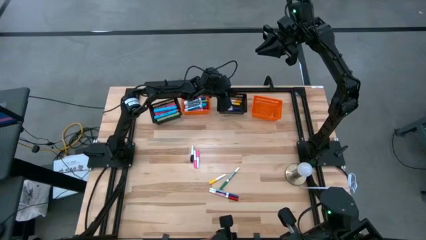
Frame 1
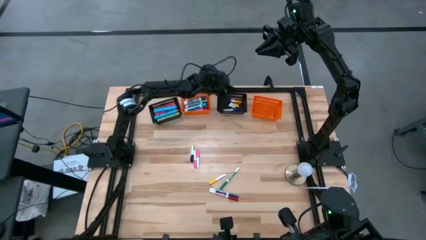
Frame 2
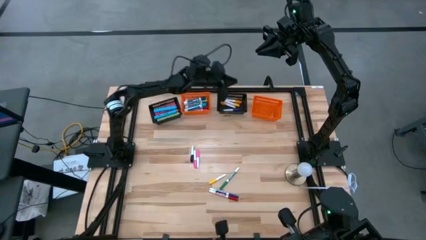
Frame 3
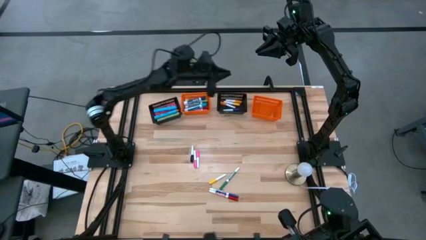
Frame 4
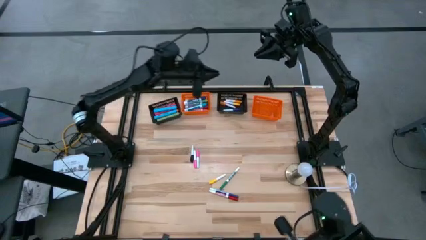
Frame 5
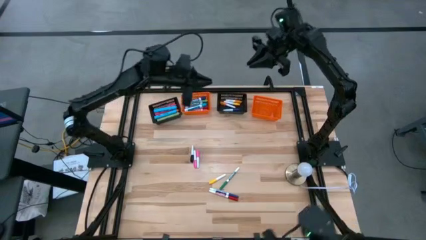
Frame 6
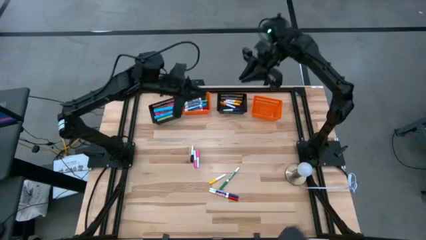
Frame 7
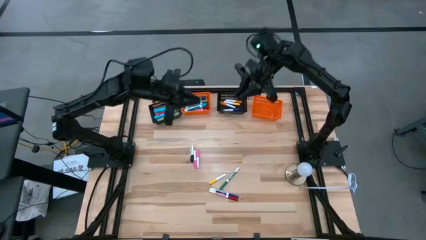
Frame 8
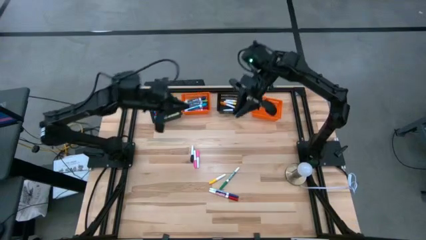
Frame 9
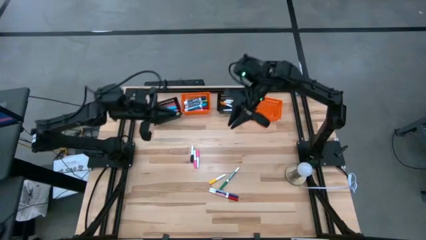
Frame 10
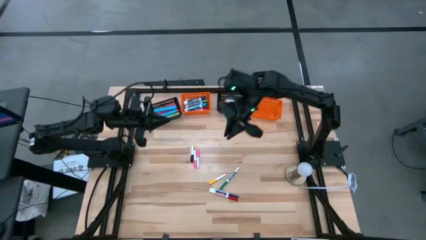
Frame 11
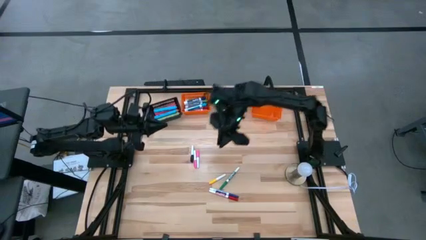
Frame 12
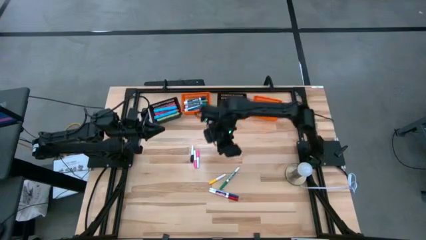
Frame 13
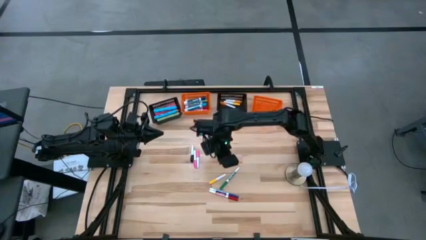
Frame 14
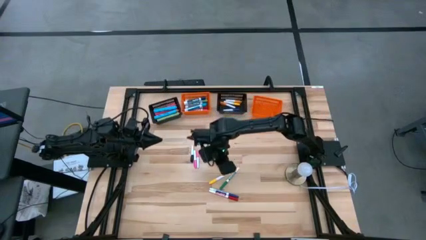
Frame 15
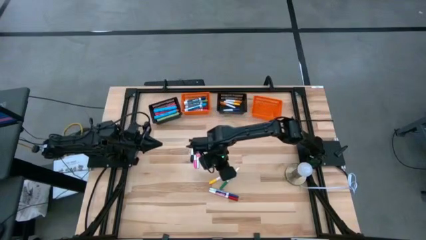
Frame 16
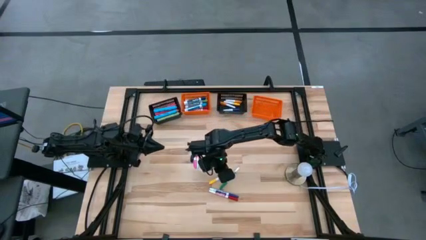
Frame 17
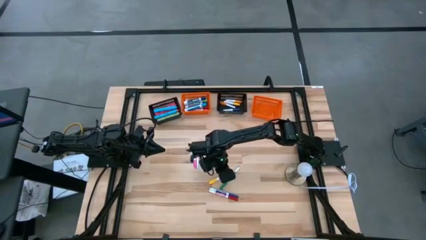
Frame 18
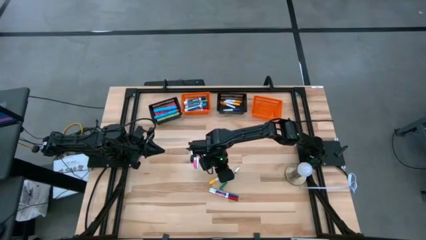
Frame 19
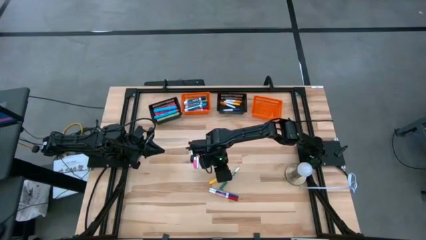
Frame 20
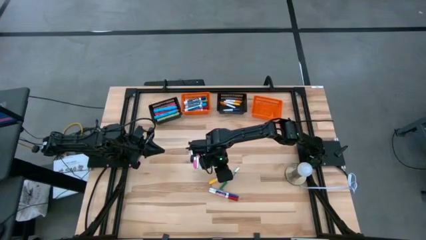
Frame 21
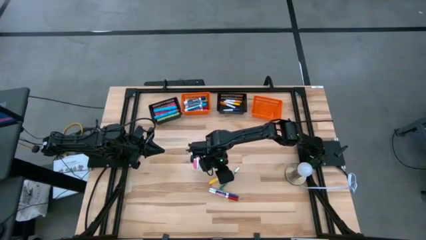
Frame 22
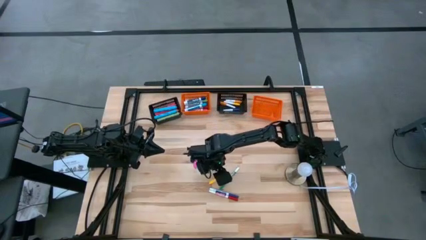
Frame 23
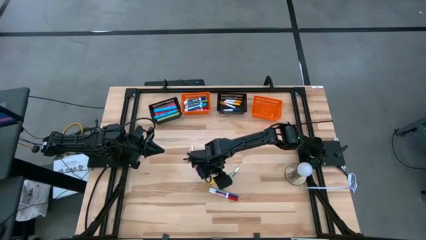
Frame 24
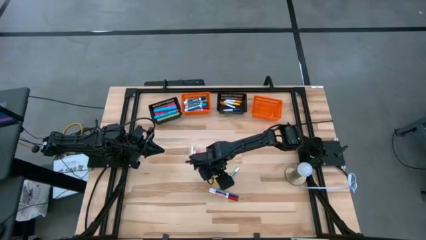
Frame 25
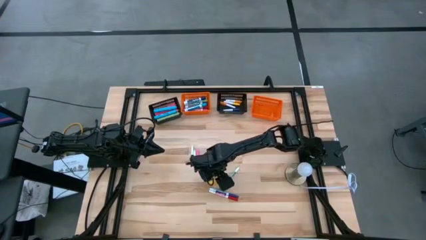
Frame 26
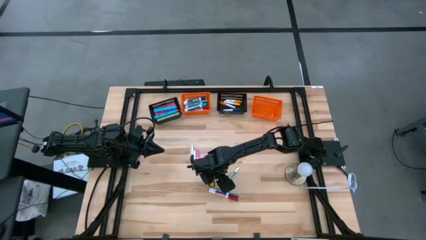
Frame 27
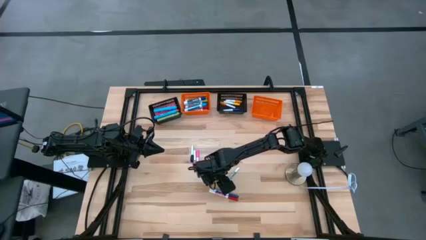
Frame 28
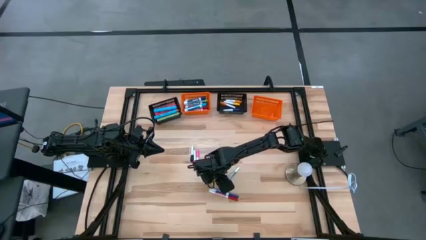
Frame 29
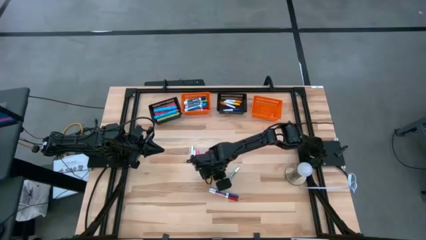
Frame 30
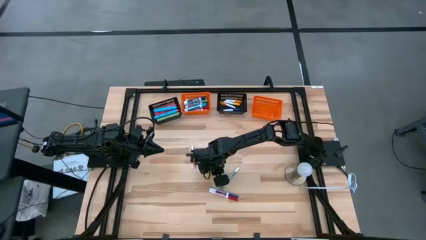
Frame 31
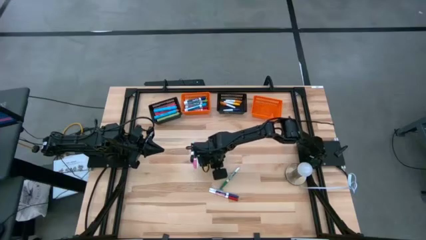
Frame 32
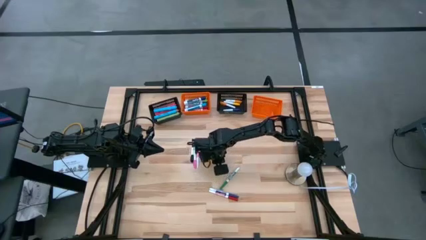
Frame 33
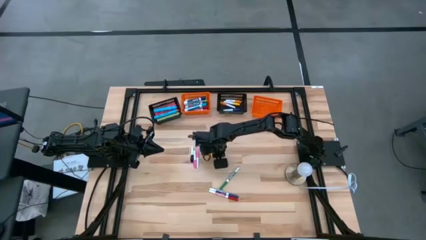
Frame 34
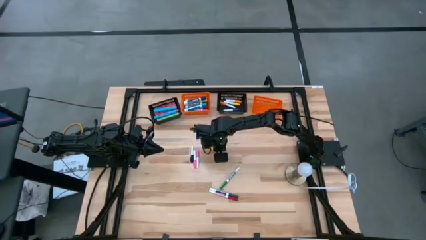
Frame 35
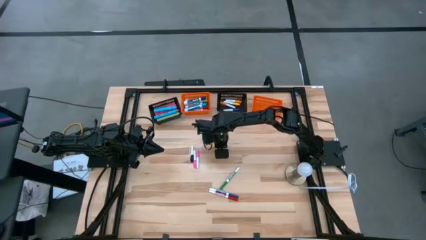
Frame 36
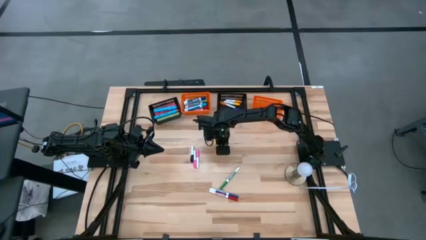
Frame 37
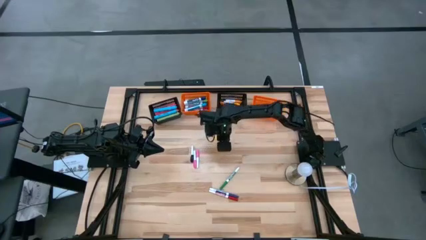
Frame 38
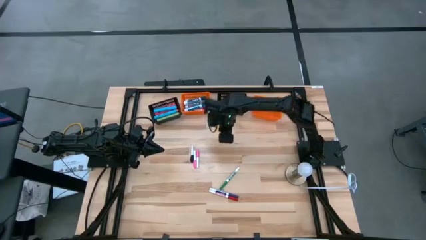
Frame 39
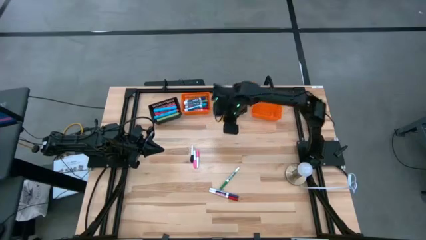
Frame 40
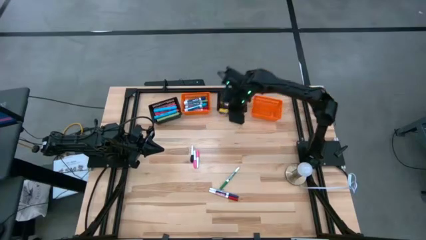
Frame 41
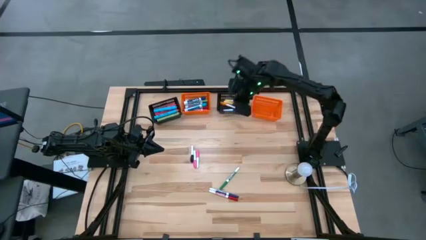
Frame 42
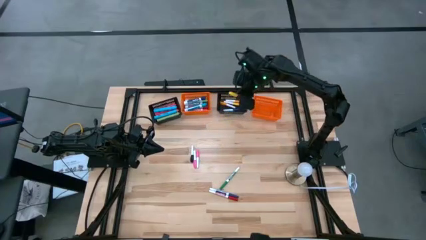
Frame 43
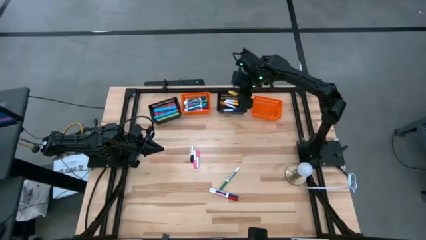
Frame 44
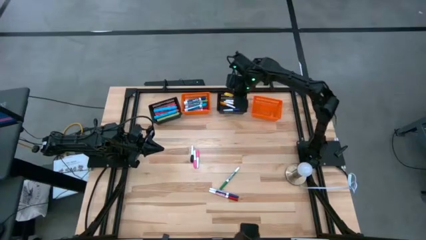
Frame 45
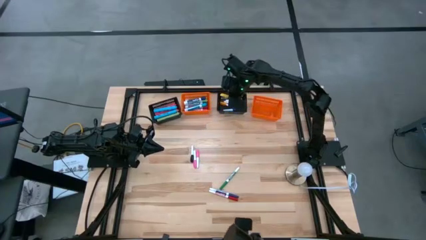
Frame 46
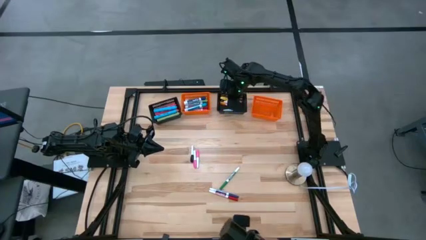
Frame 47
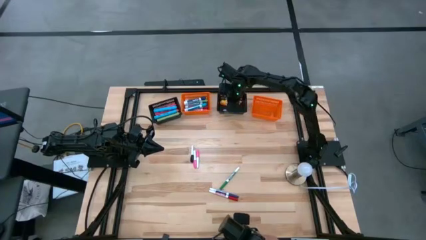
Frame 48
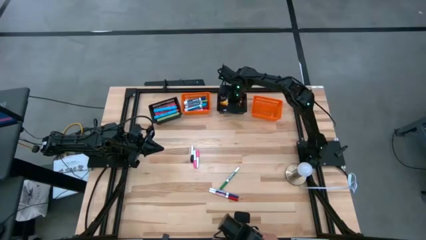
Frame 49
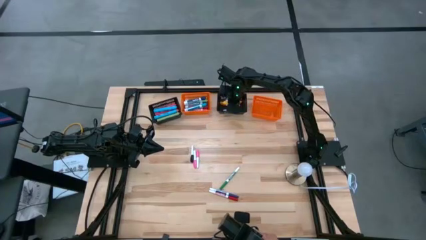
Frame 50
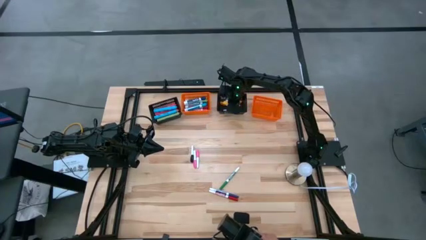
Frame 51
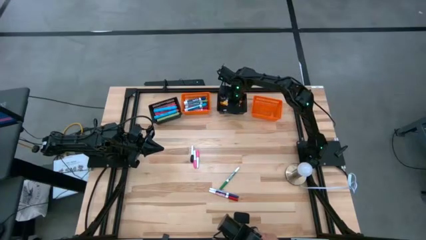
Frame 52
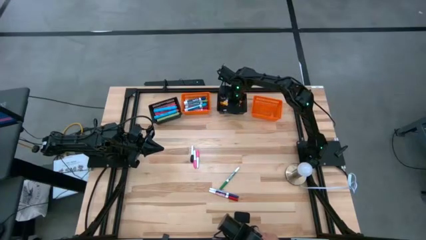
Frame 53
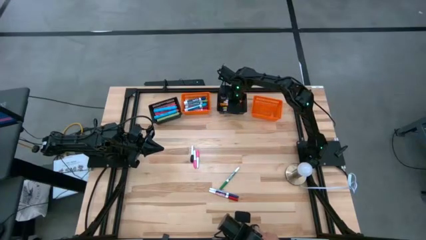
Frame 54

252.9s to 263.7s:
Task: Pick & Place Markers
Put the yellow mini highlighter into the right black bin

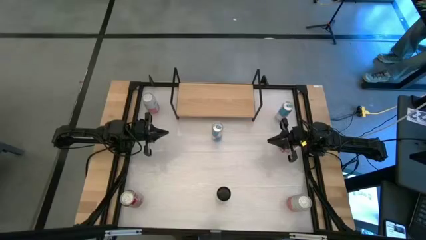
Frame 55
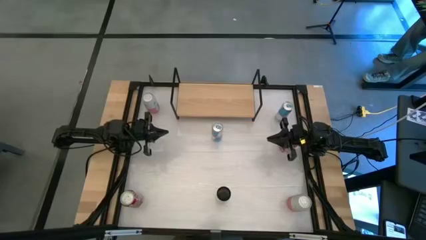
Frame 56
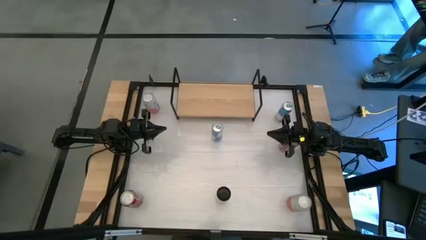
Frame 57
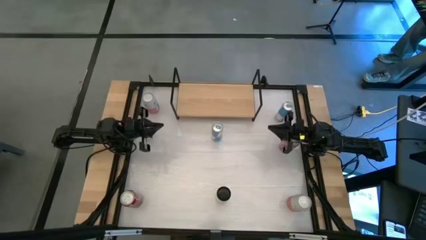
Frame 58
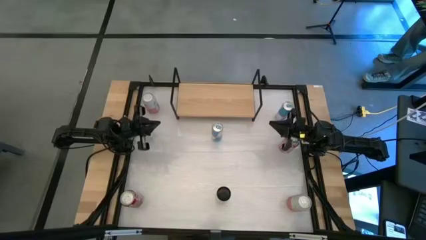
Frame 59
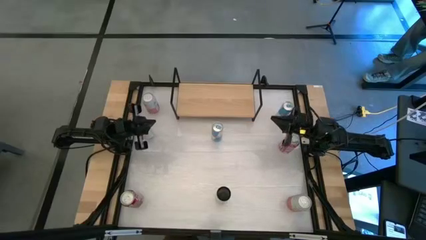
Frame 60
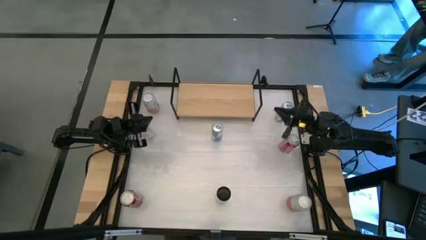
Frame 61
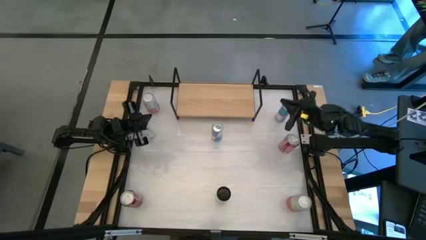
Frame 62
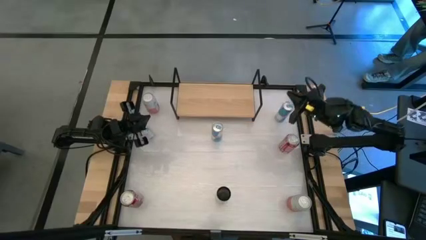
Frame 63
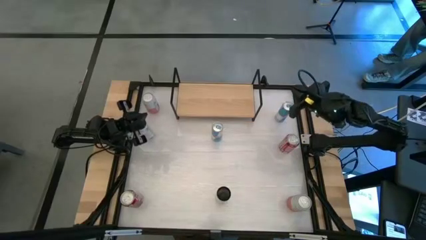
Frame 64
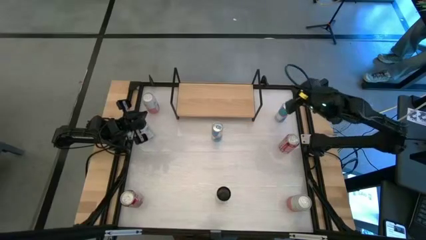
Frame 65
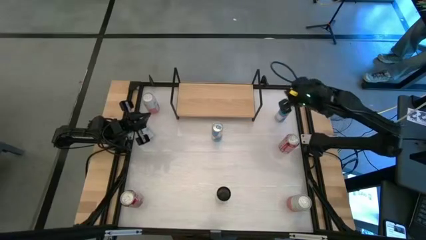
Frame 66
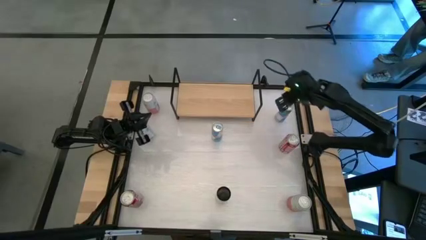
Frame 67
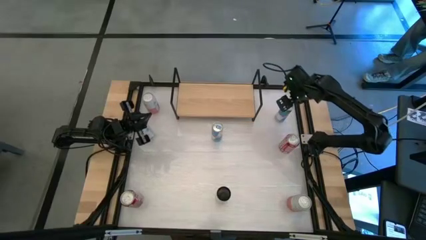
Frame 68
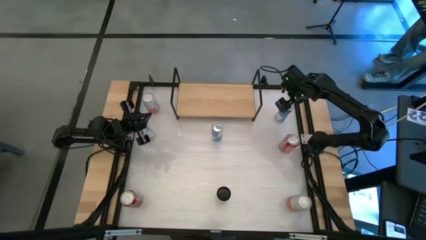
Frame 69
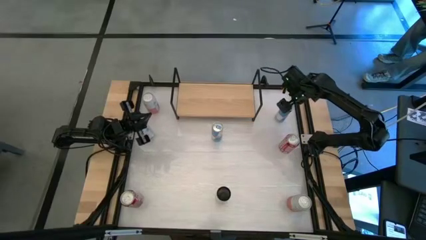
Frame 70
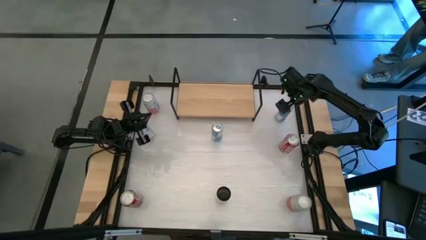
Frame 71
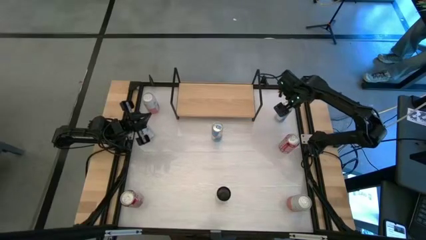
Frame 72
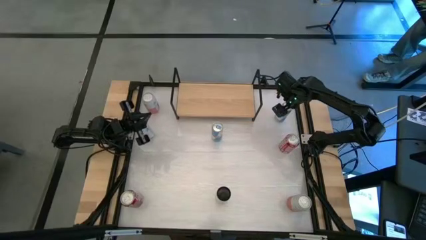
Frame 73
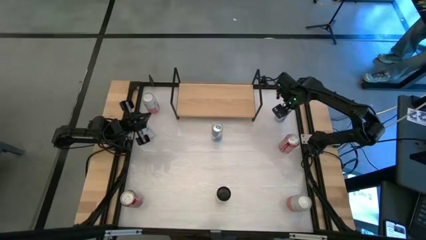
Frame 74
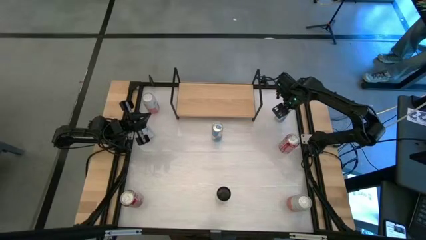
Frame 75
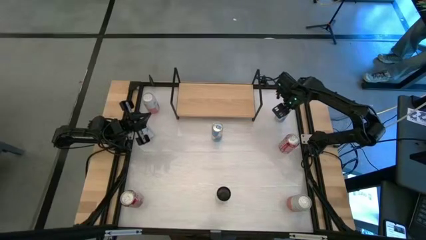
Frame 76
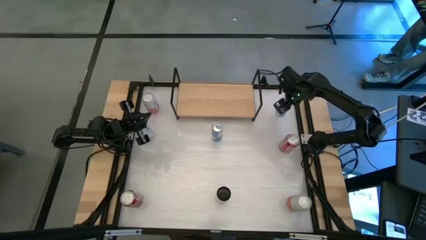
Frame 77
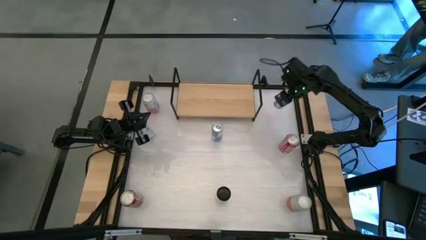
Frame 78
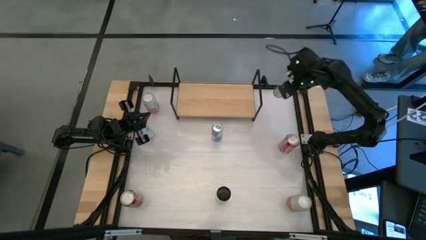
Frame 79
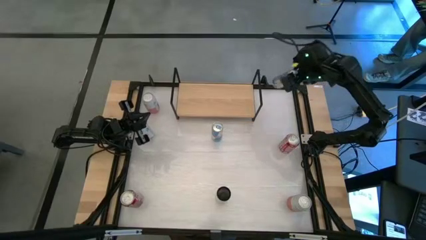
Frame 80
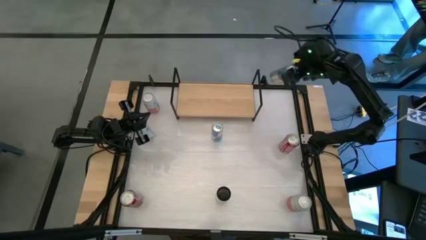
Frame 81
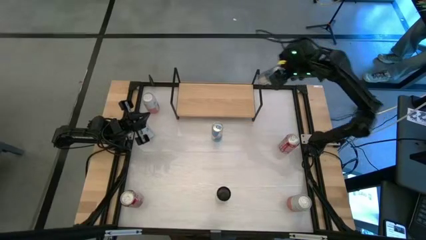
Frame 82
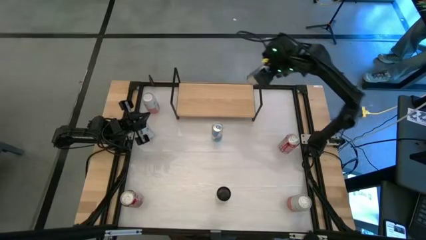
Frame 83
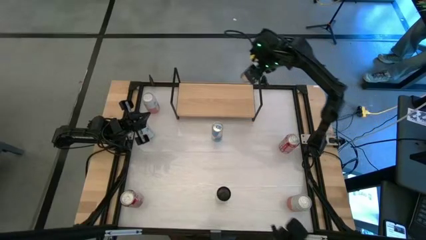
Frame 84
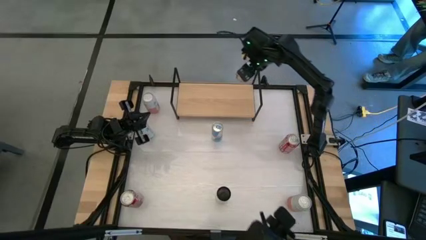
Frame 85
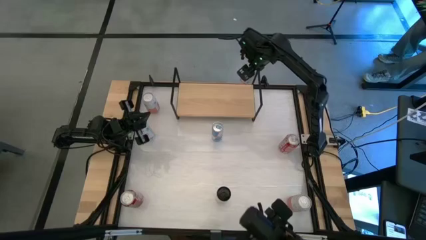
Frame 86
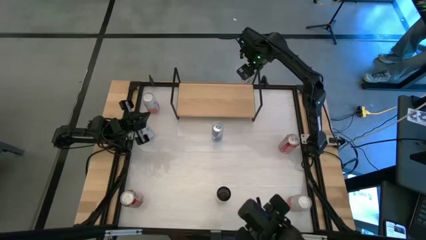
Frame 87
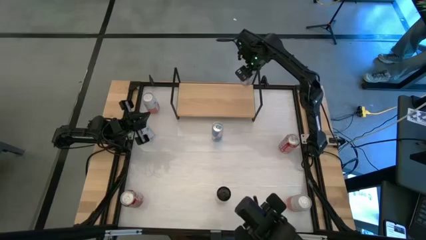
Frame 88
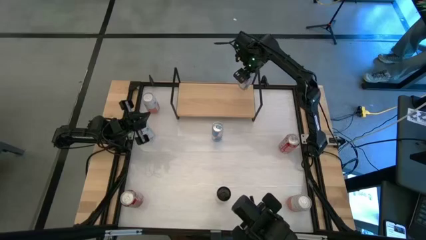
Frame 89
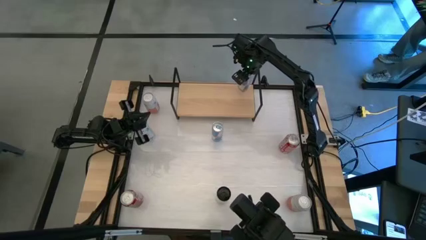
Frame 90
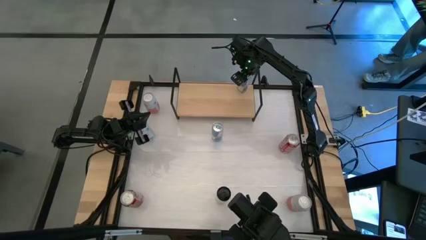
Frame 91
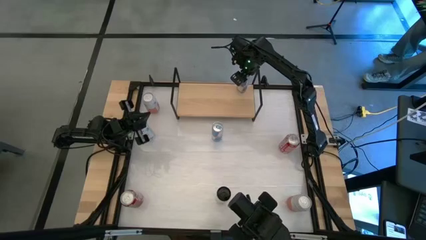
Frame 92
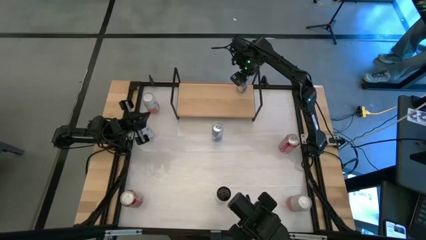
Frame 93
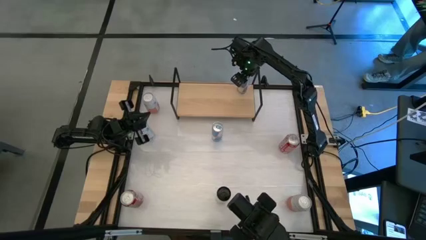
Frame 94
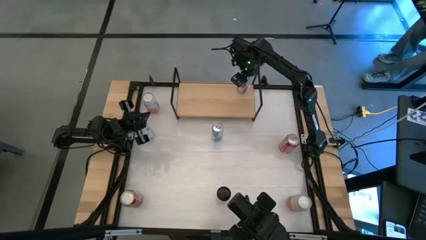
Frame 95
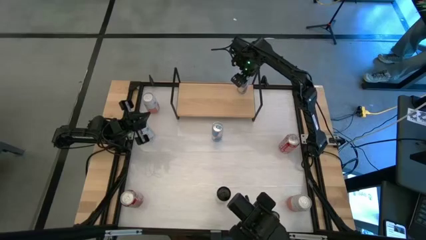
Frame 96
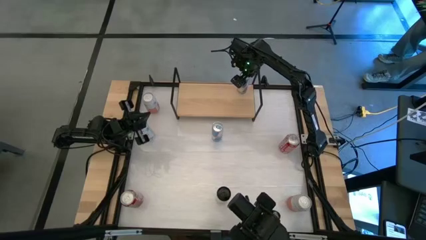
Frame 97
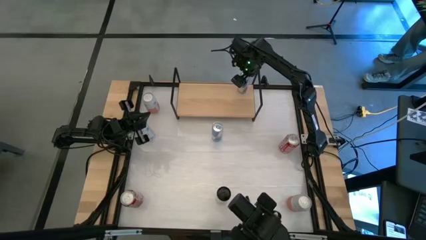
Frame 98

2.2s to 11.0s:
Task: Place canned beverage on shelf
Put the right blue soda can on the shelf
